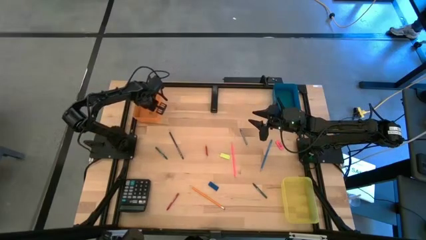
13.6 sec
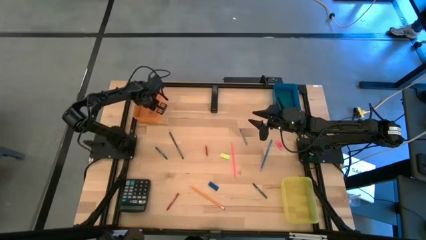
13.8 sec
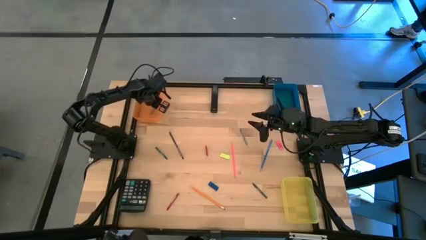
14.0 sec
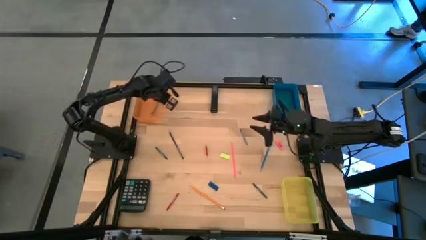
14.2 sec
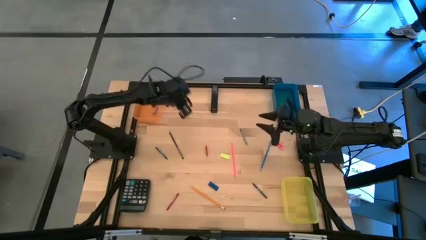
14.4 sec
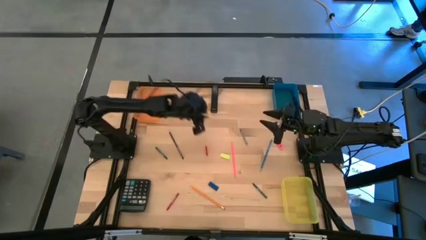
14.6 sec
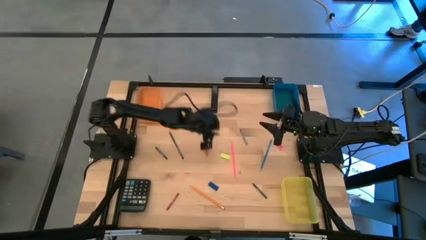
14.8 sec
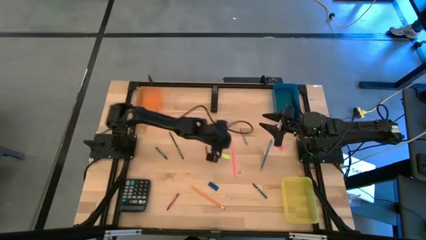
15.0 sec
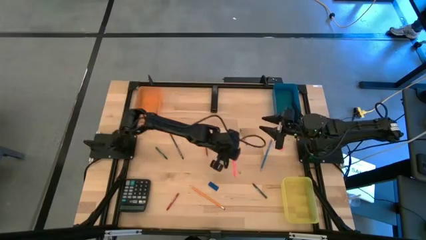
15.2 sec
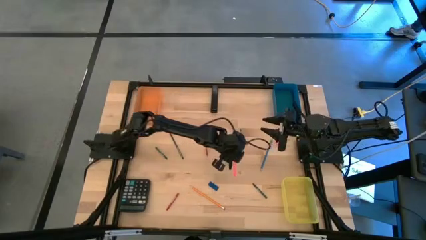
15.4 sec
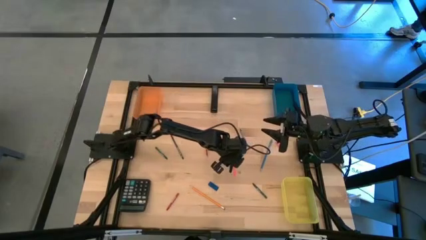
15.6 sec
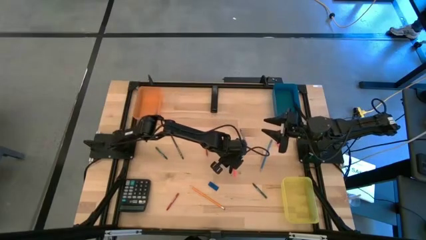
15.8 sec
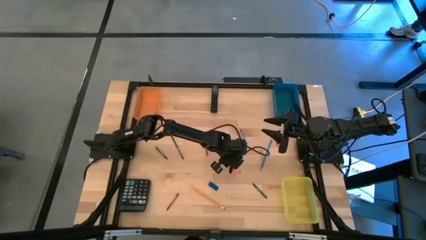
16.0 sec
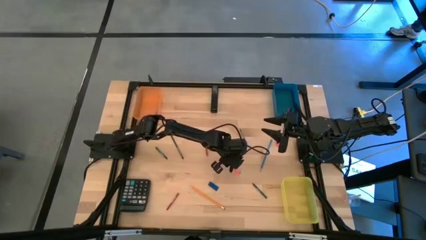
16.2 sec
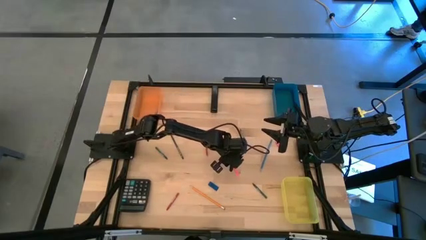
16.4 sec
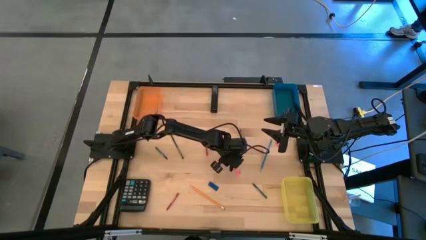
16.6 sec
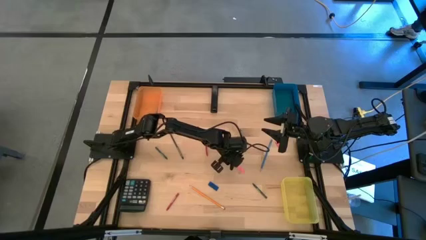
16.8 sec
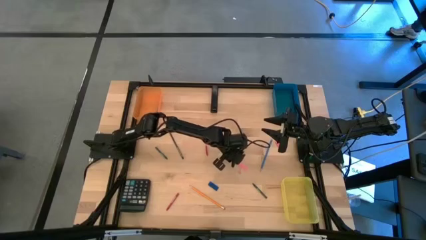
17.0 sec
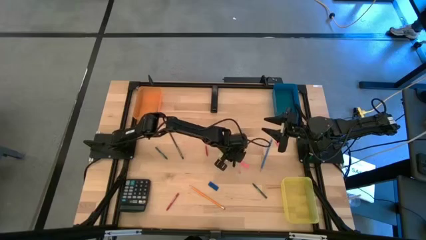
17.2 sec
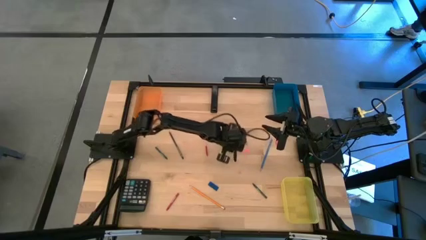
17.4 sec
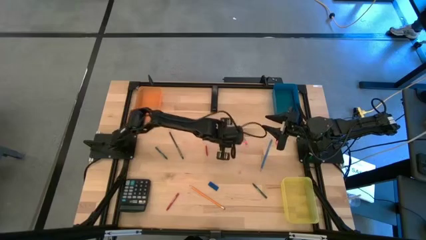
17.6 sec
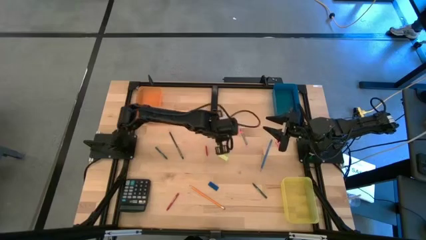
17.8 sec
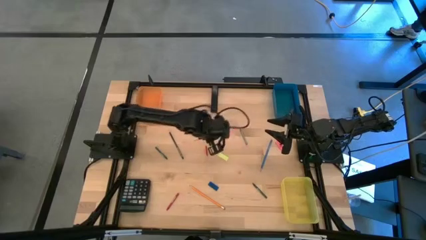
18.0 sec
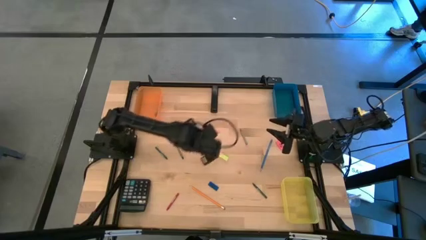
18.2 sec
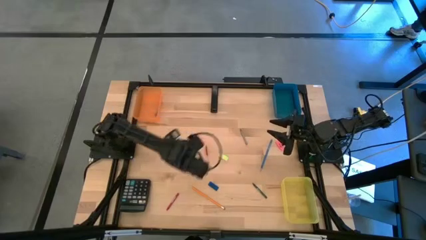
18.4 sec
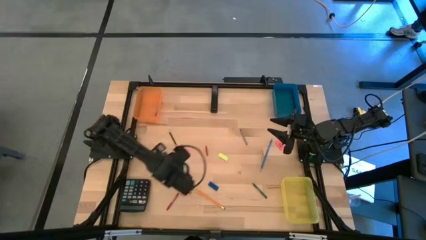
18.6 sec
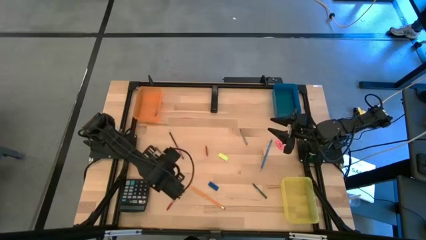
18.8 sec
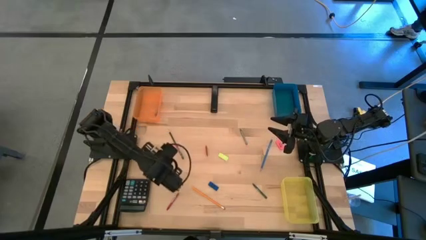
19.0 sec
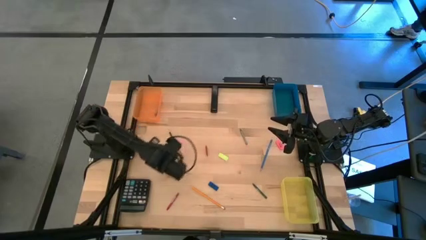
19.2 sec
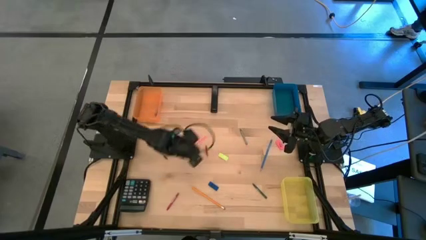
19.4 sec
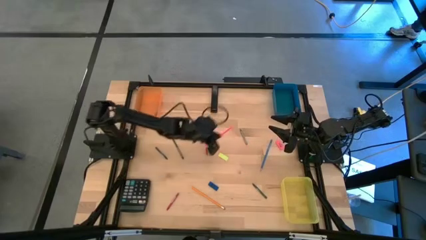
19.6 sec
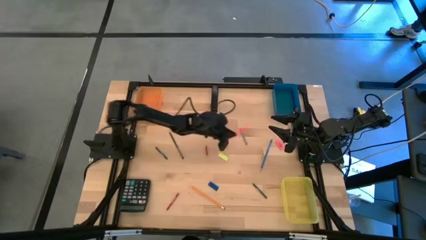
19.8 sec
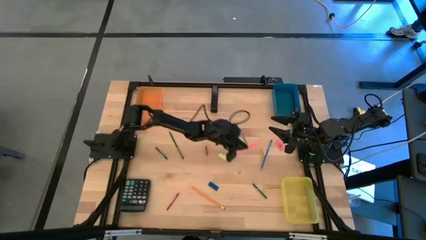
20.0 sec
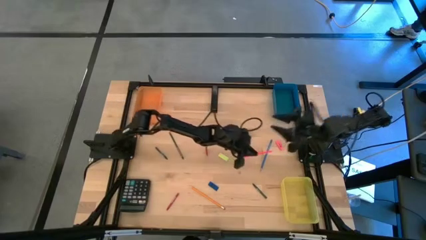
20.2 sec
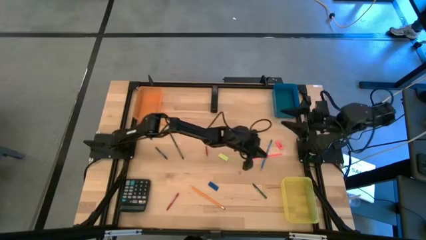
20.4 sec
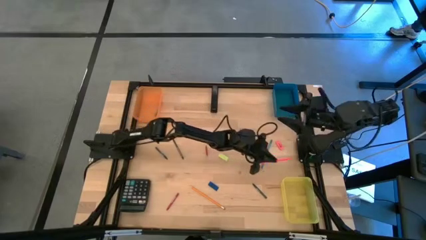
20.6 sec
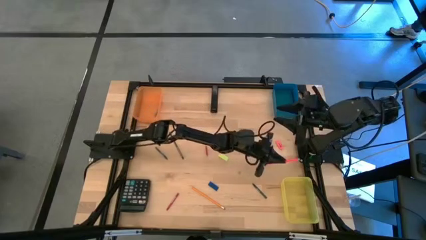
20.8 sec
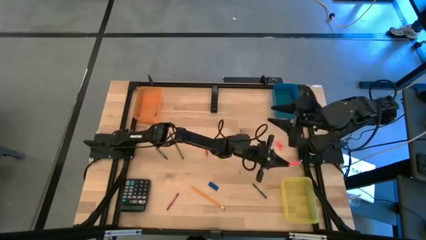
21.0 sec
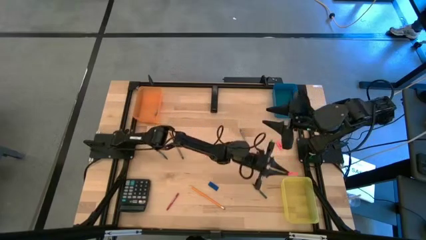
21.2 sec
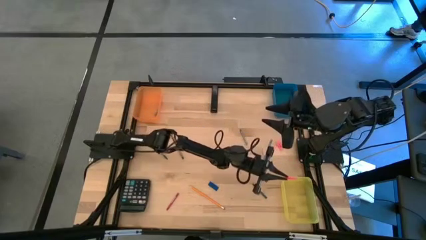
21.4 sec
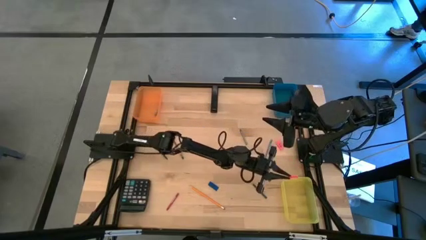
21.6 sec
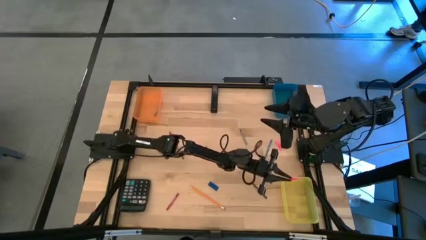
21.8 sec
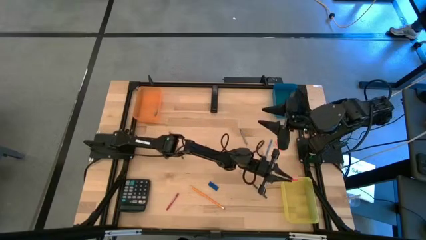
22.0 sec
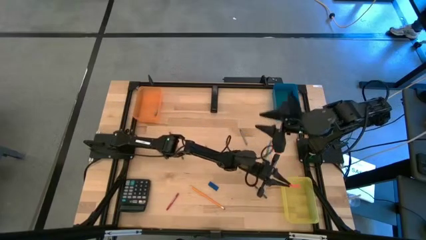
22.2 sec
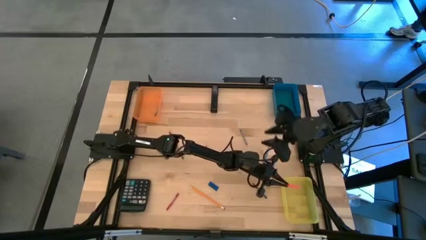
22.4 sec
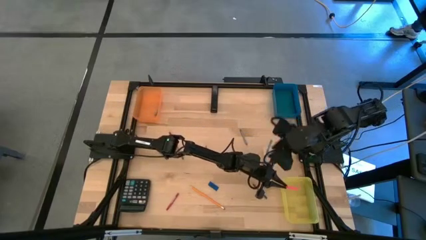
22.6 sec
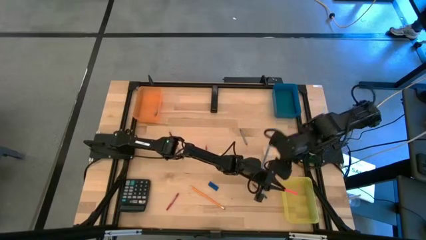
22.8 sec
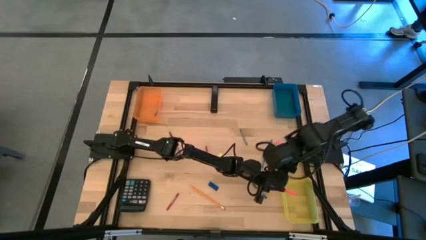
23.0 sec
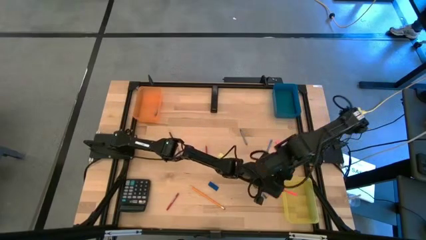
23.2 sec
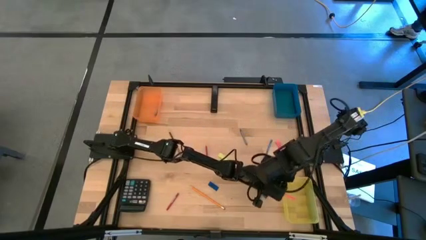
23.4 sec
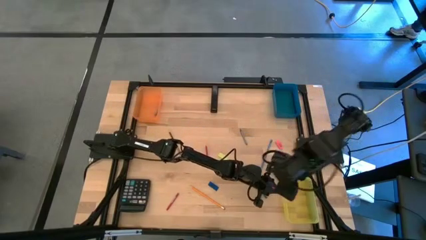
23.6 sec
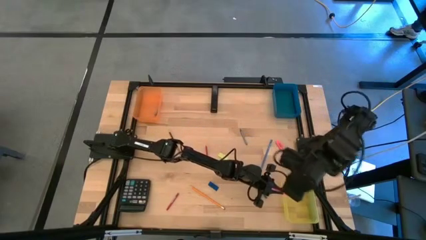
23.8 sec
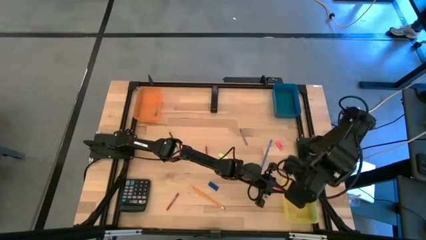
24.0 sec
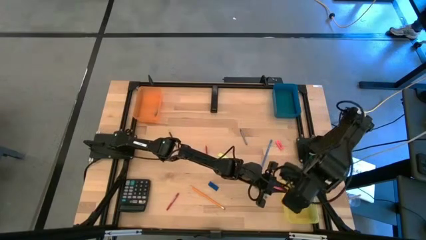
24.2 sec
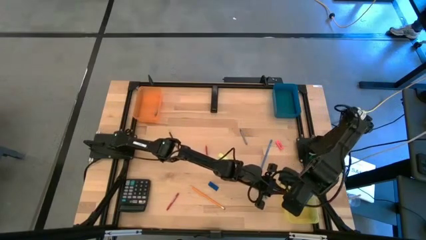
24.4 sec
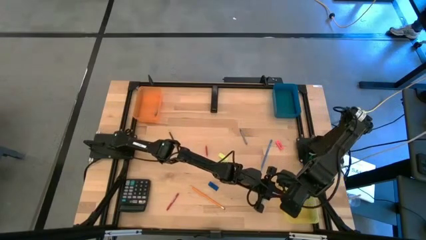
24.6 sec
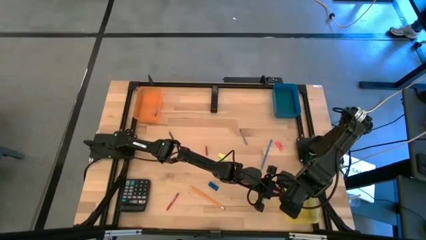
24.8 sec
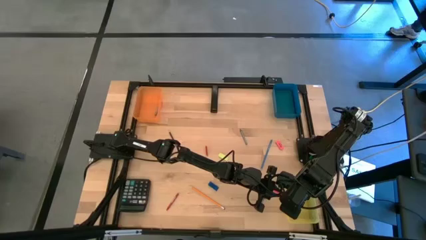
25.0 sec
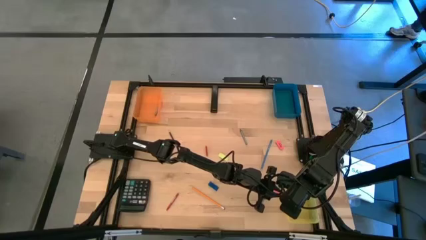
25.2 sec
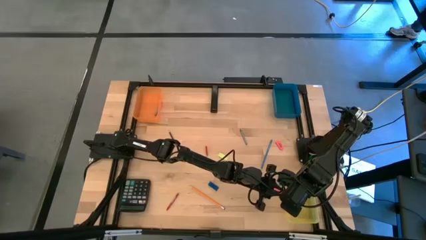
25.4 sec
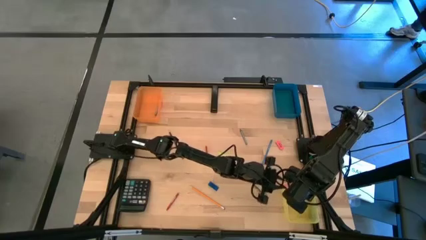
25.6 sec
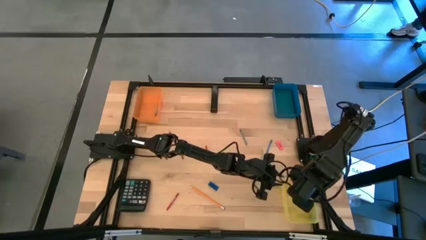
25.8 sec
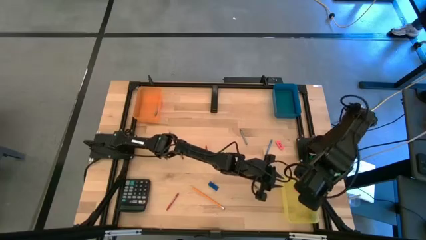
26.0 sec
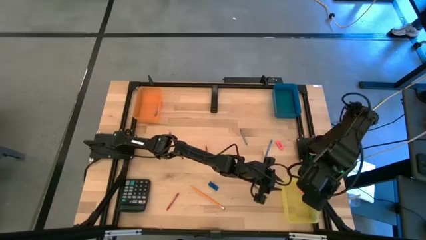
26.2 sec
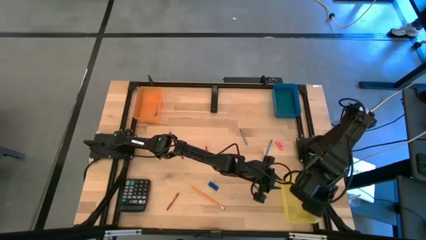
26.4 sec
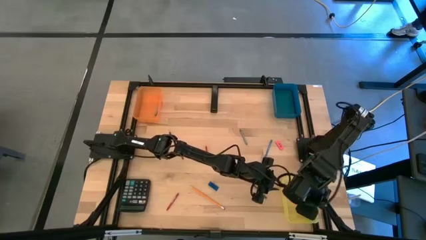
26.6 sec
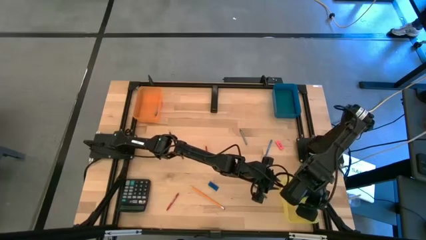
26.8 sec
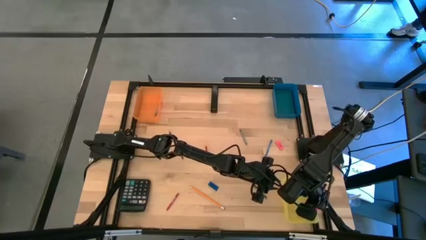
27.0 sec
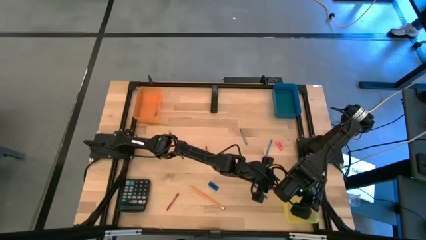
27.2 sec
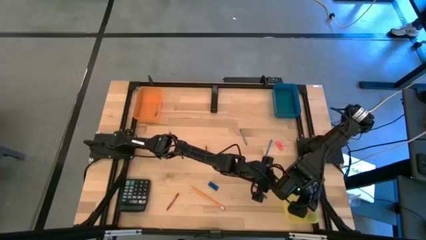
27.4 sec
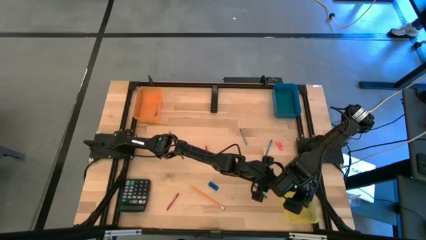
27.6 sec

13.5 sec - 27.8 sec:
Task: Sort crayons/erasers/pens/pencils in bins
Put the pink pencil into the yellow bin

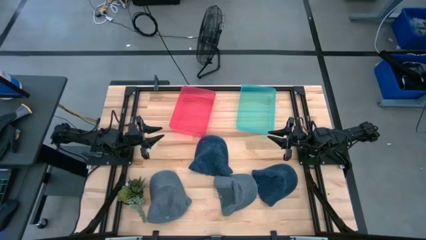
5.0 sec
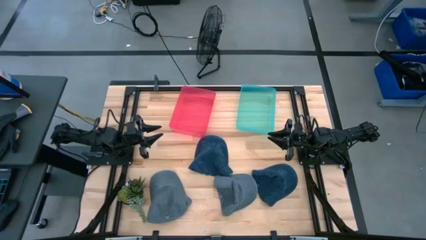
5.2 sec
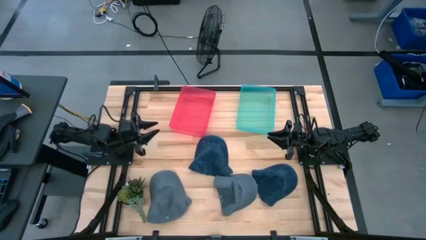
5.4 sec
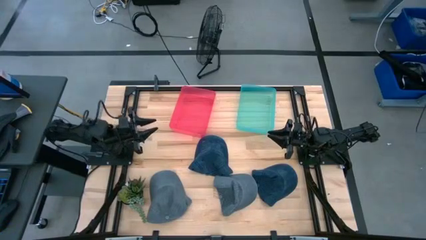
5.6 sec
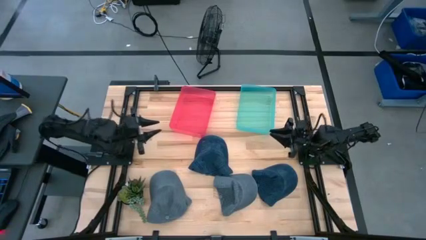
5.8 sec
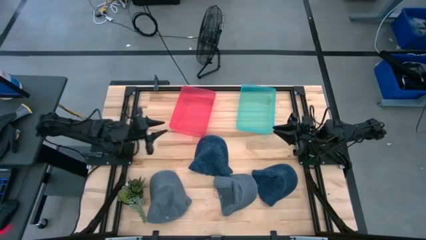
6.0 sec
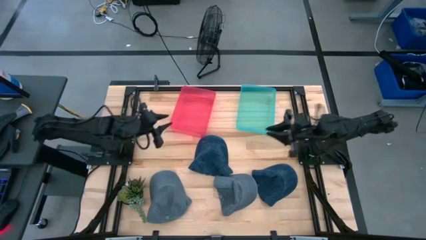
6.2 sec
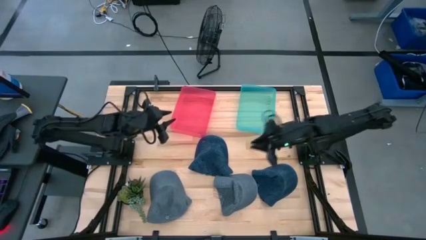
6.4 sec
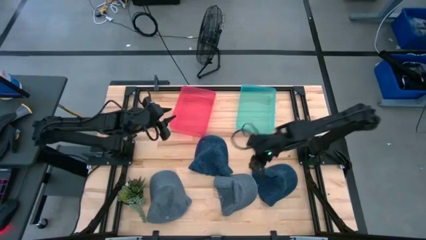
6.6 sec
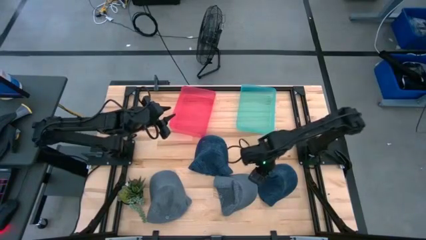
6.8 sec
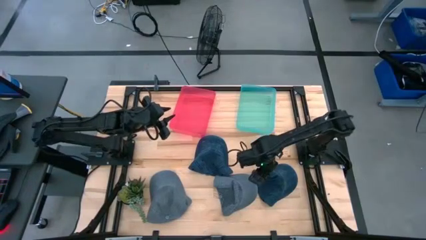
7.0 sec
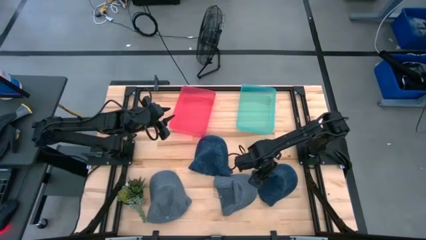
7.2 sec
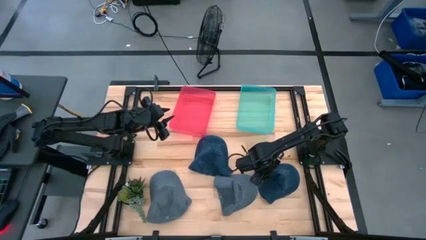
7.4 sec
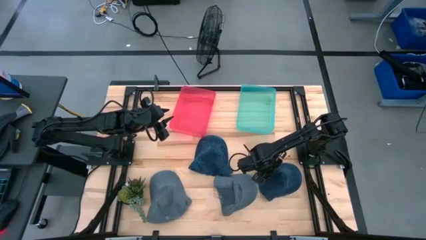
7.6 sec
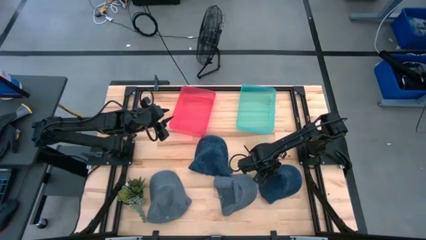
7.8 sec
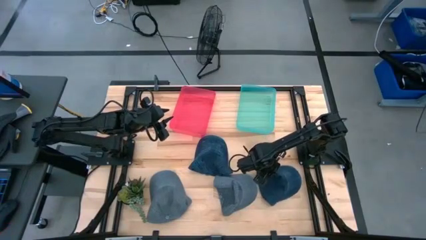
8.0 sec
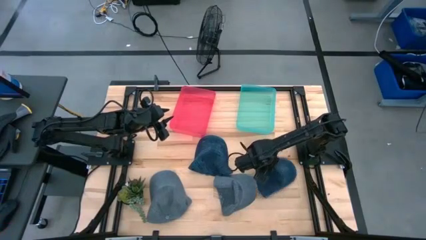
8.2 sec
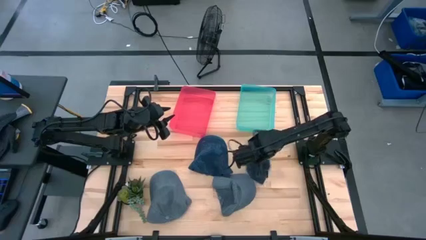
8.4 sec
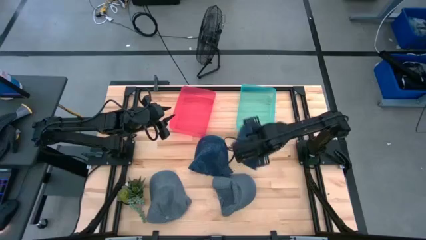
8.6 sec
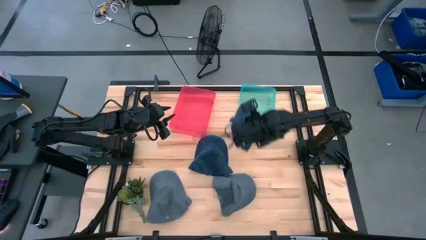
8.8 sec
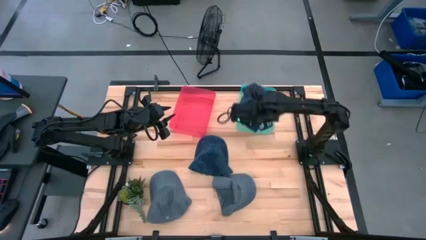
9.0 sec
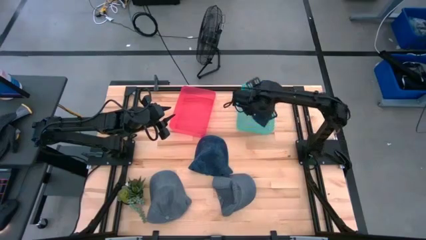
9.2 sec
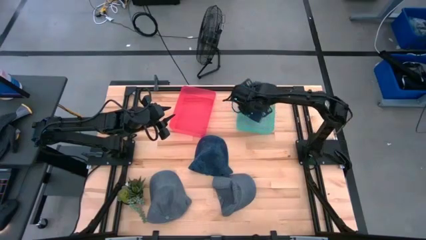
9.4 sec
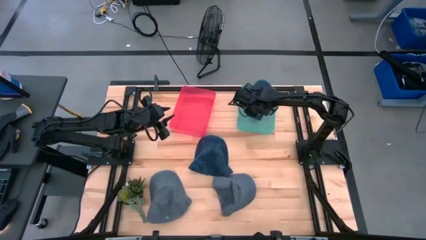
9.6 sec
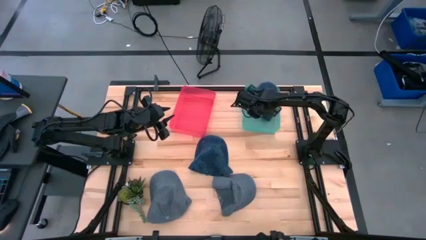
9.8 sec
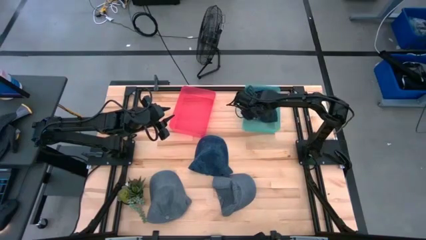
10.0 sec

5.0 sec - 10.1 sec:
Task: Pick & Place hat
Put the right blue cap into the blue bin
